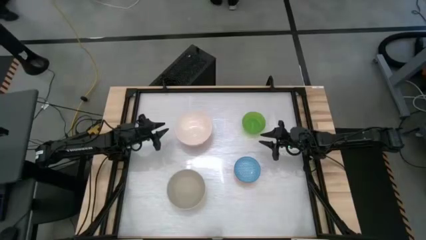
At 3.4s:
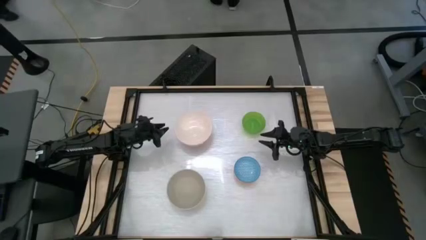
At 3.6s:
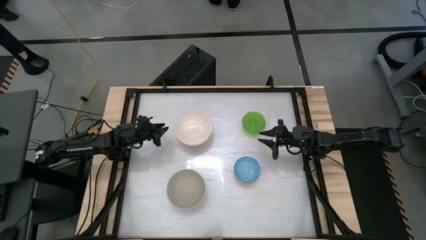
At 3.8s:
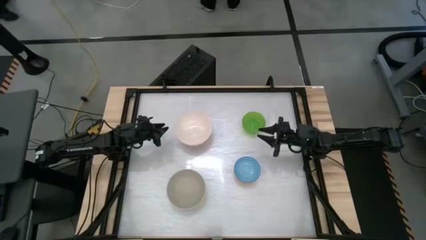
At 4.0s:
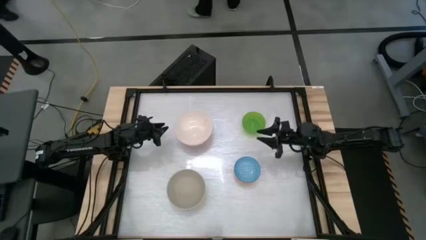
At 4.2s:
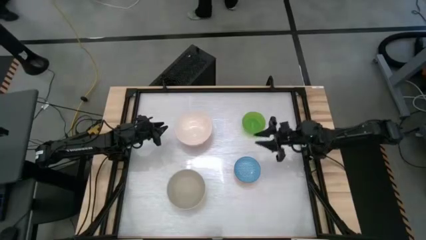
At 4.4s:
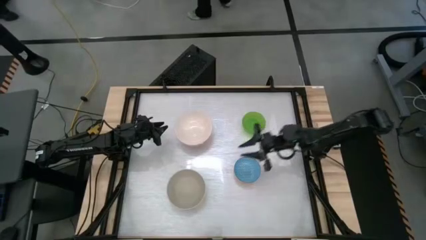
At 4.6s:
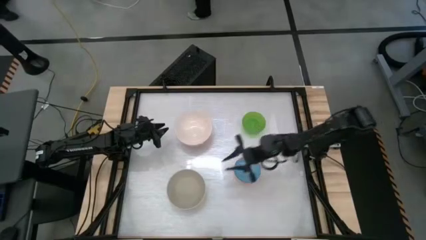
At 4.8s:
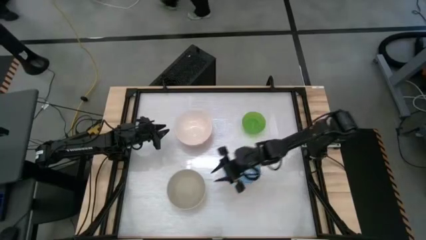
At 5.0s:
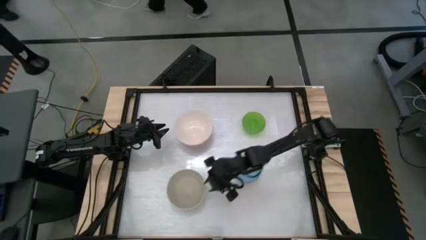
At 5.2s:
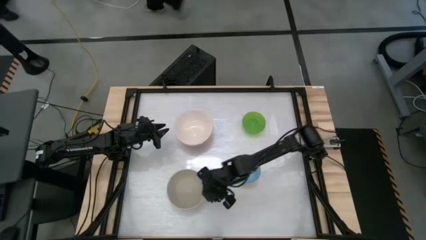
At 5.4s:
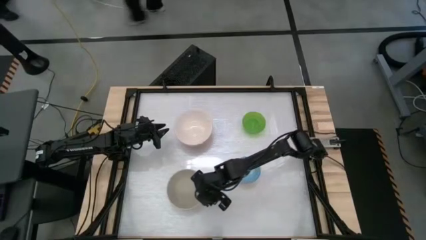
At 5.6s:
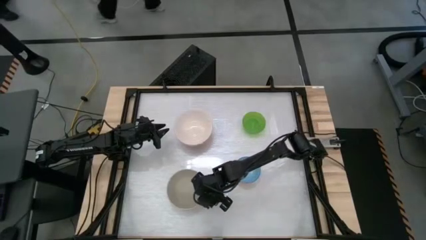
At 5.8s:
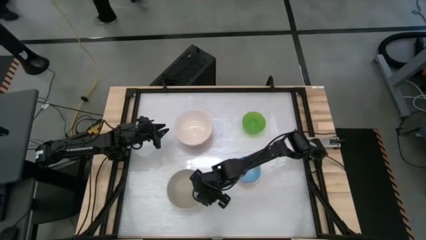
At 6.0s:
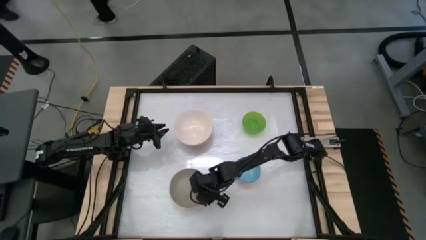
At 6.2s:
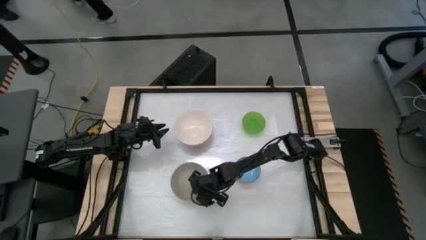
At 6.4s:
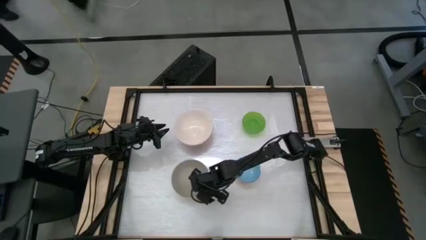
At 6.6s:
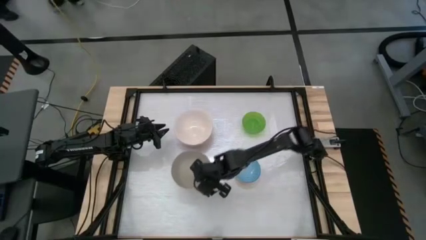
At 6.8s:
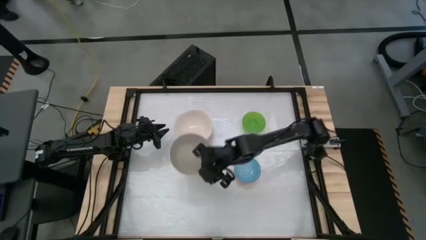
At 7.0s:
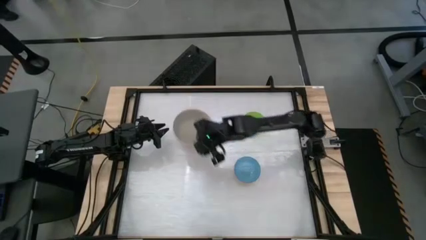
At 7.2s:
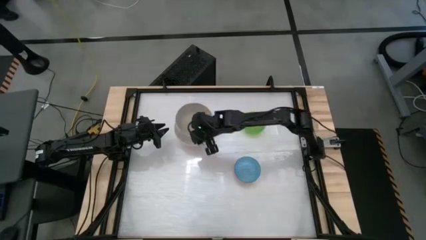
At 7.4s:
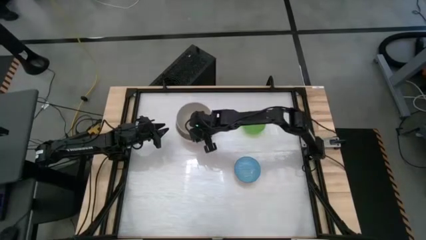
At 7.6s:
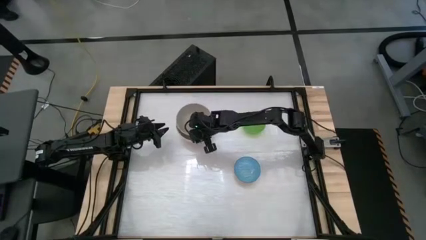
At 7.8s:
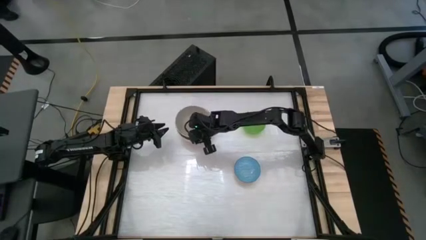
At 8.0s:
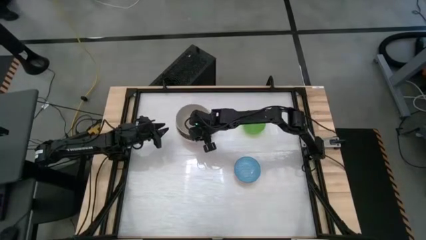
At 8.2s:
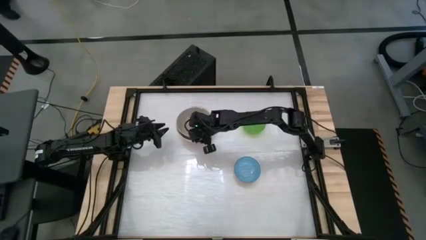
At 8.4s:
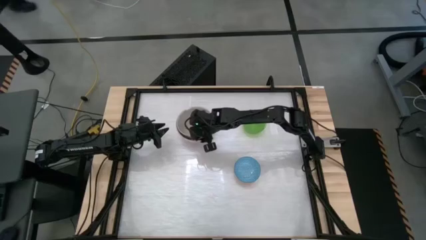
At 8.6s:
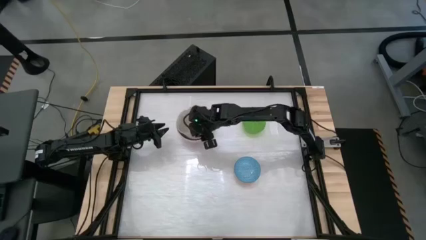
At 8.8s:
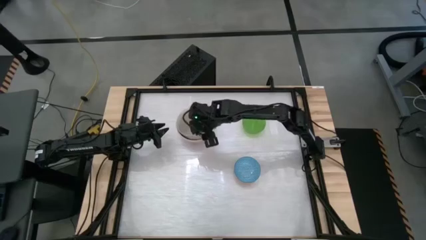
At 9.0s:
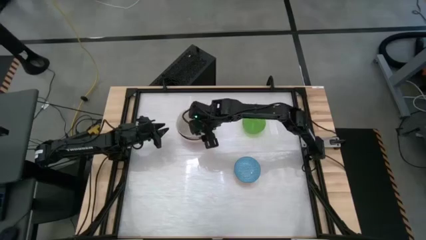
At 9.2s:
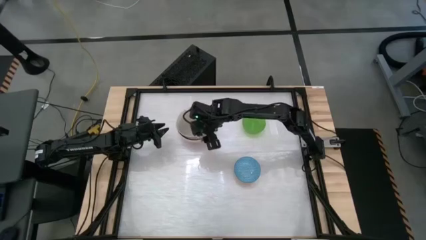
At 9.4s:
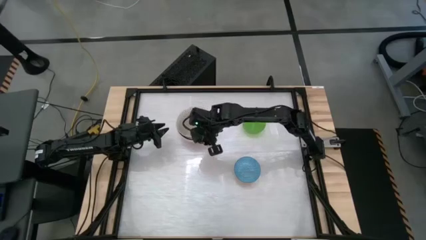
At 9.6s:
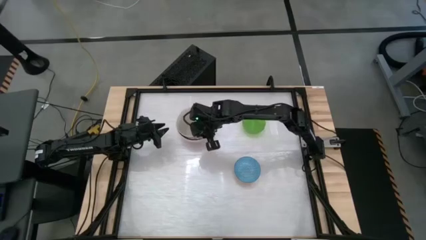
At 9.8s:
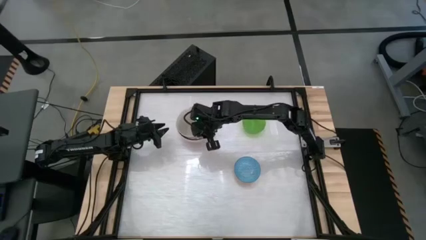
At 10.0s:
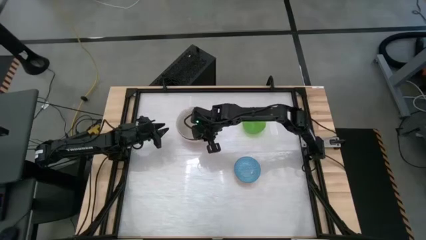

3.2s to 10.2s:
Stack the gray bowl on the light pink bowl

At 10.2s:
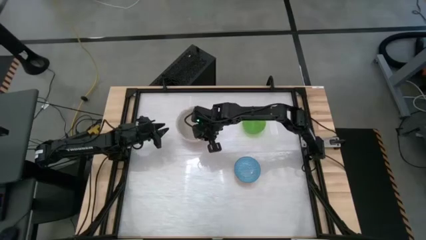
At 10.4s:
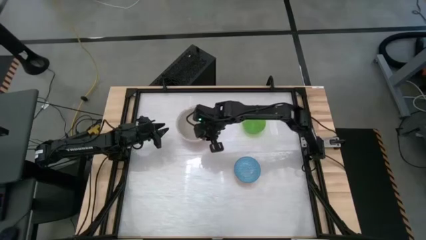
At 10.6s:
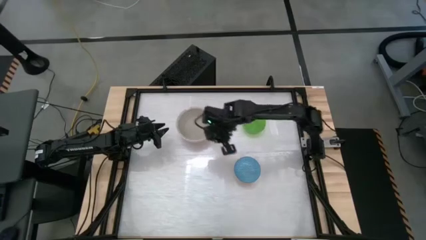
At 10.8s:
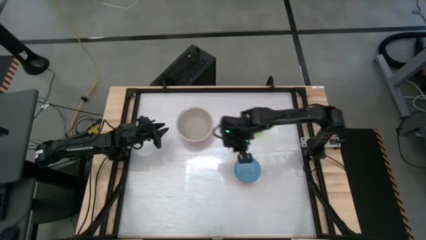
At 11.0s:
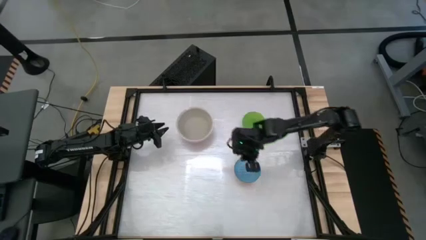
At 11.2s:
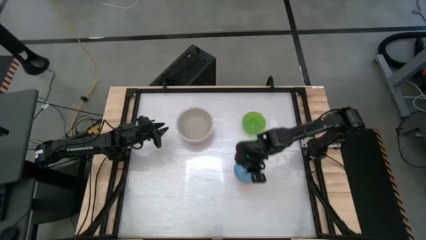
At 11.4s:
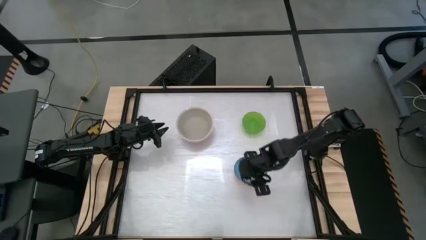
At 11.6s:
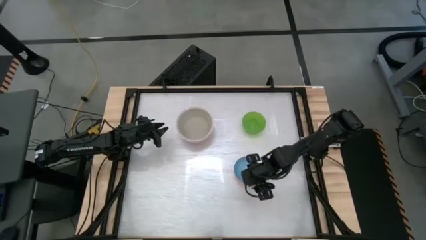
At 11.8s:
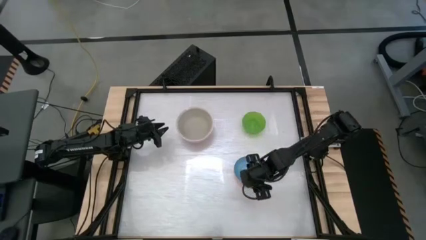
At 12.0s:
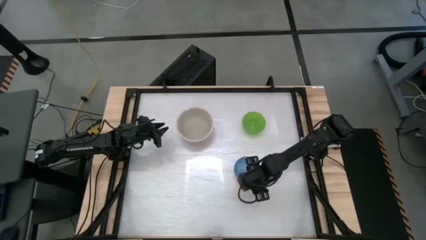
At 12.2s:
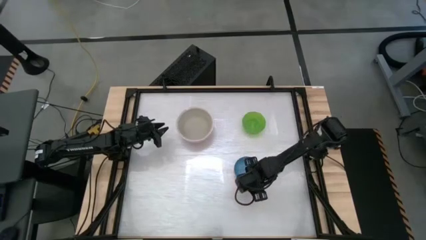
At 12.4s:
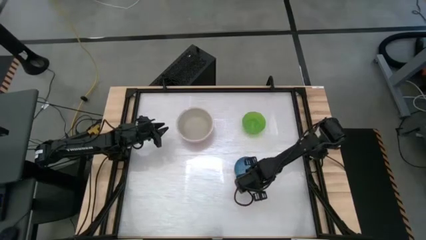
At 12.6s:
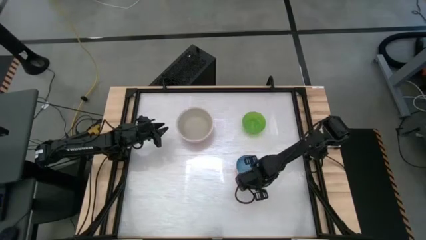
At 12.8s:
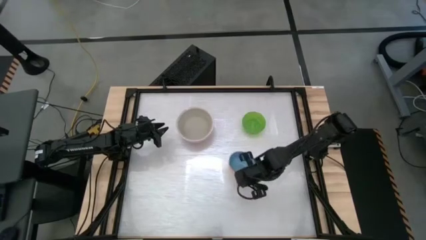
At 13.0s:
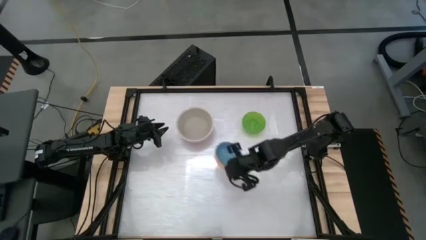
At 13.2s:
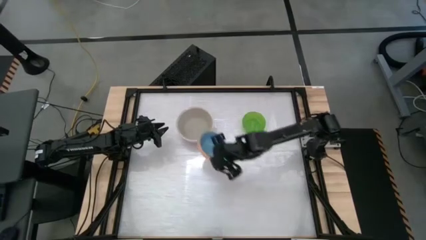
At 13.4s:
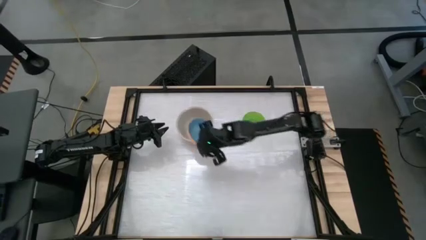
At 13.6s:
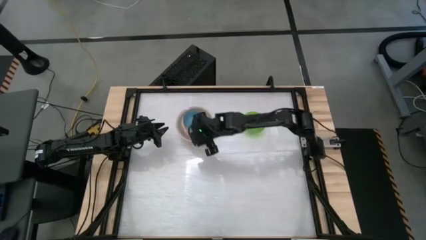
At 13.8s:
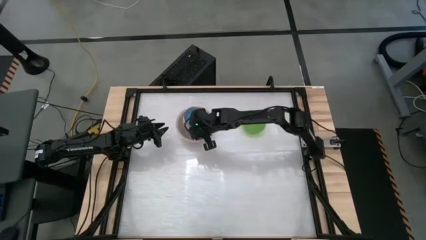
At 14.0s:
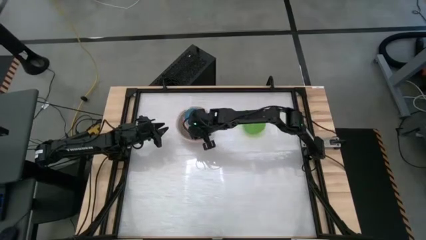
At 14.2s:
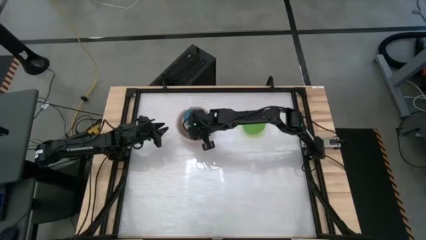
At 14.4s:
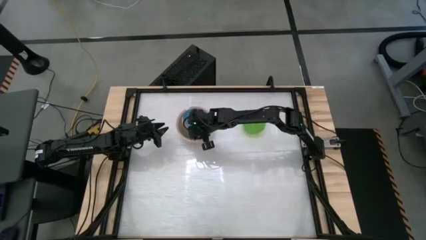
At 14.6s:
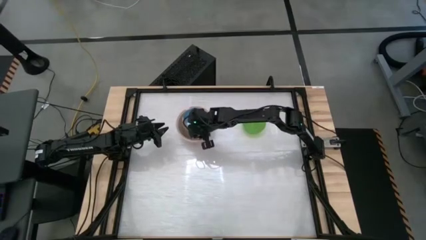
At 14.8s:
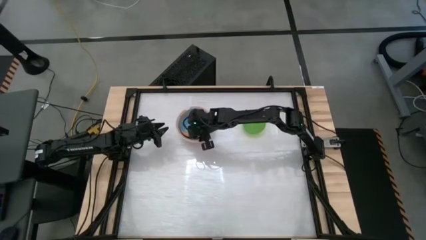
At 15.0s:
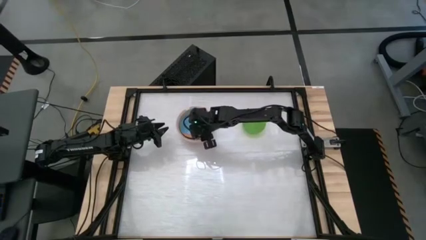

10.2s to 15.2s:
Stack the blue bowl on the gray bowl

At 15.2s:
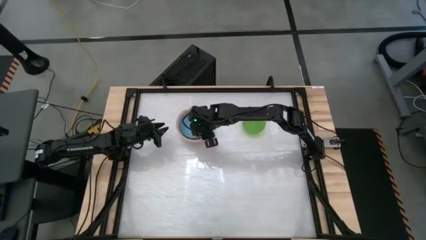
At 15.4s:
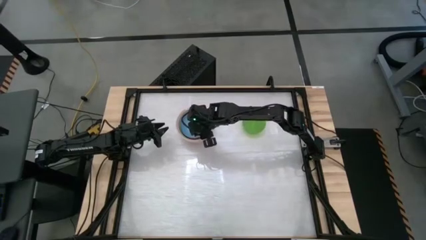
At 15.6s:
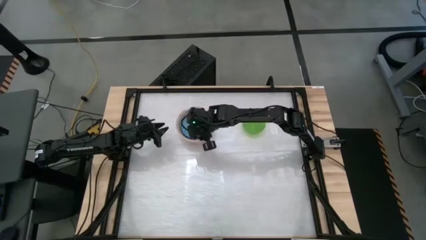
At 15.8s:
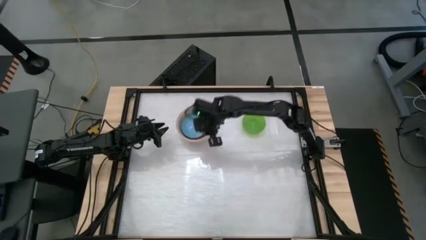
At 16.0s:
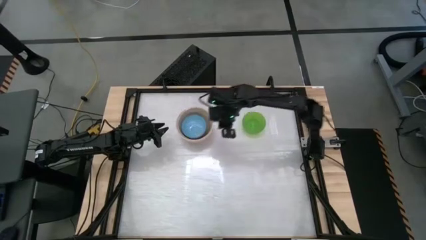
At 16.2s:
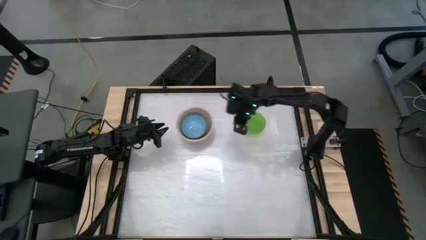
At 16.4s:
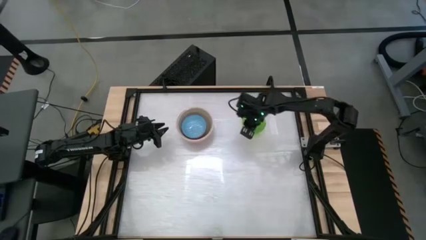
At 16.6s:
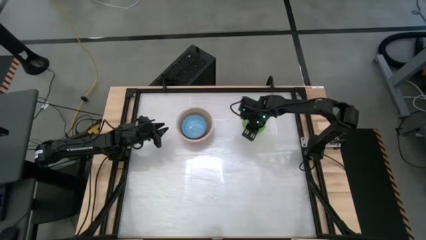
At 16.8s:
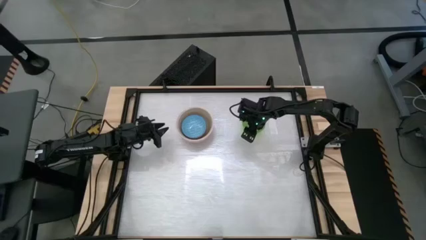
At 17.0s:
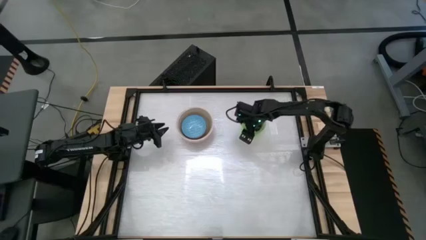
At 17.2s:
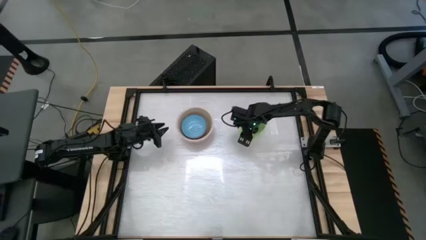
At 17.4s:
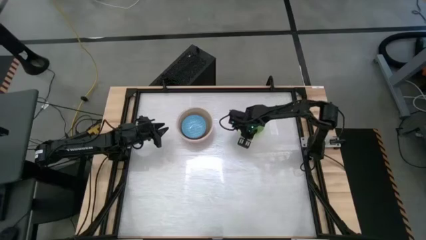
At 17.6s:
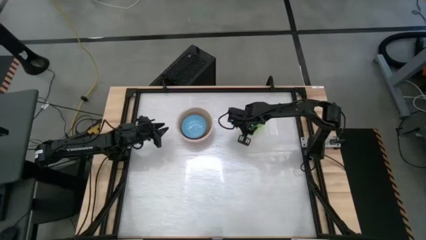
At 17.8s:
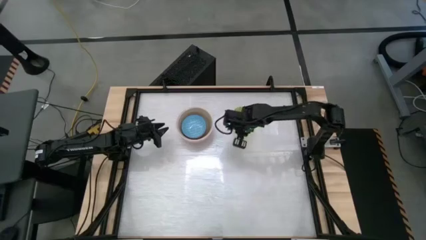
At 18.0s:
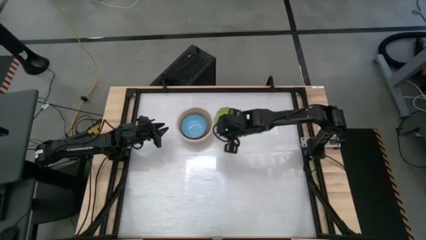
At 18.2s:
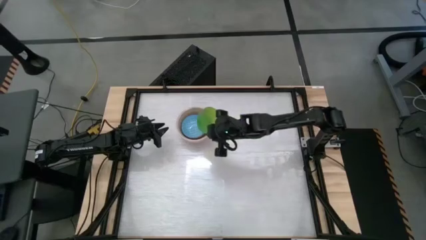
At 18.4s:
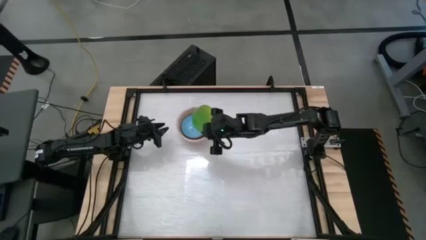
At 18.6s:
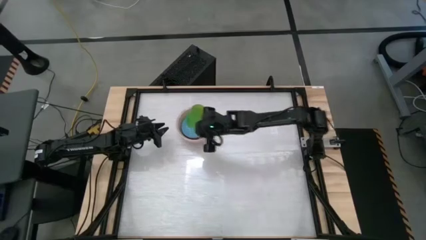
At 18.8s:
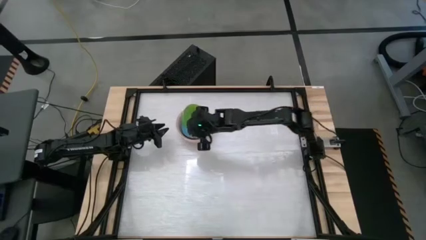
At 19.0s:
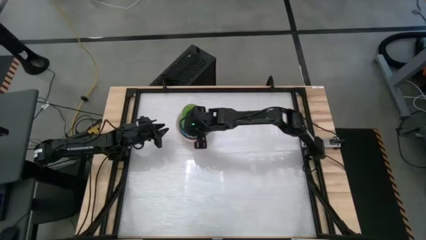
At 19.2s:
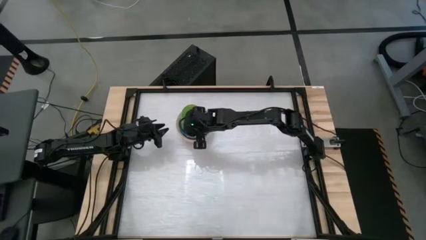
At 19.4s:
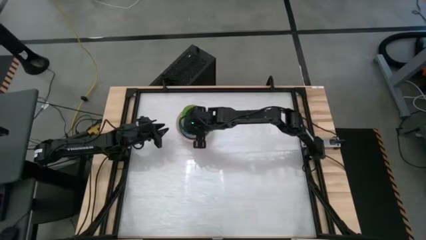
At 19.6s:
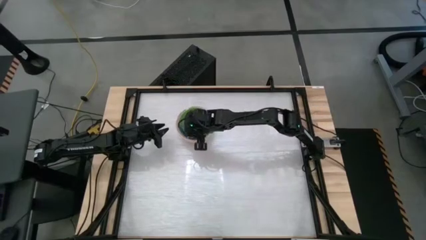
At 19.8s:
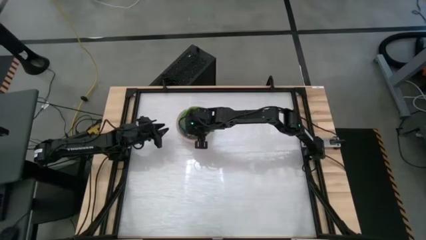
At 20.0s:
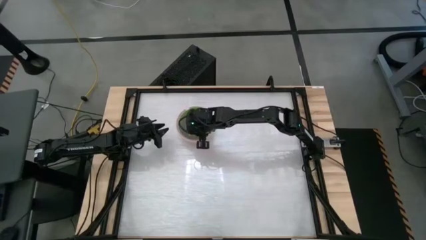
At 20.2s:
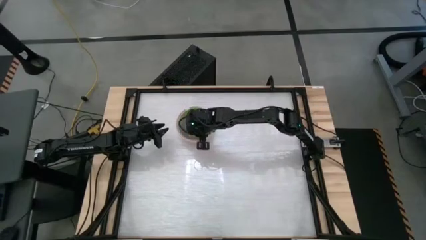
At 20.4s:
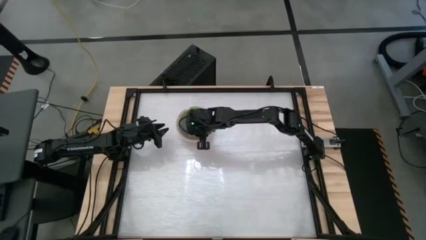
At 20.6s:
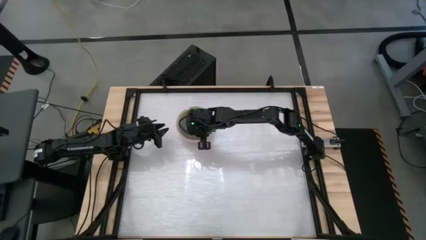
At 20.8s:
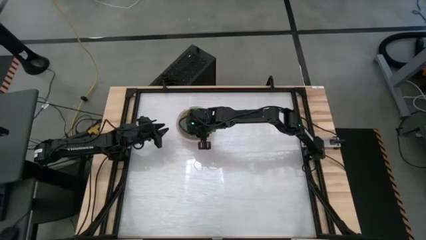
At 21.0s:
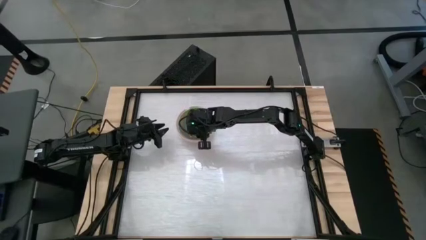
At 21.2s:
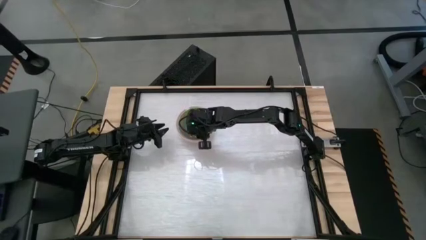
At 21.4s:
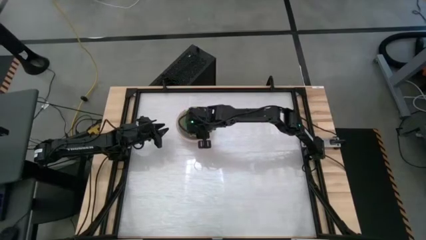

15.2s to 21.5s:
Stack the green bowl on the blue bowl
